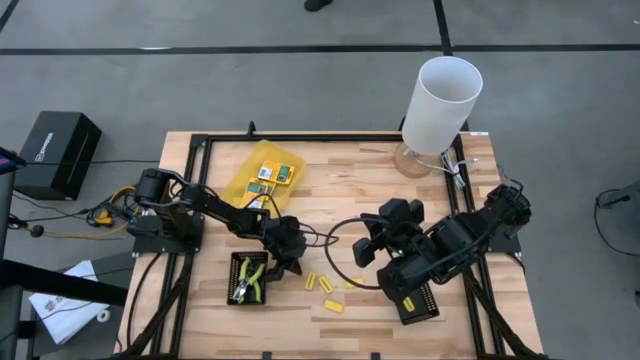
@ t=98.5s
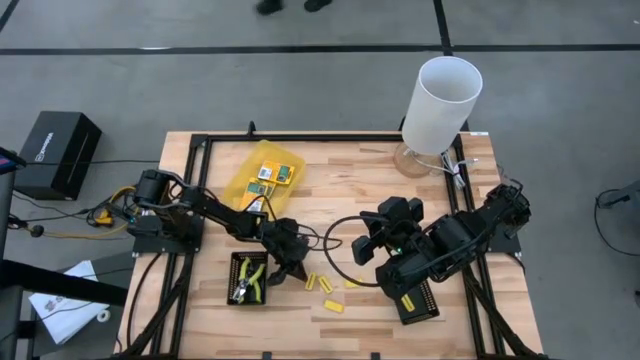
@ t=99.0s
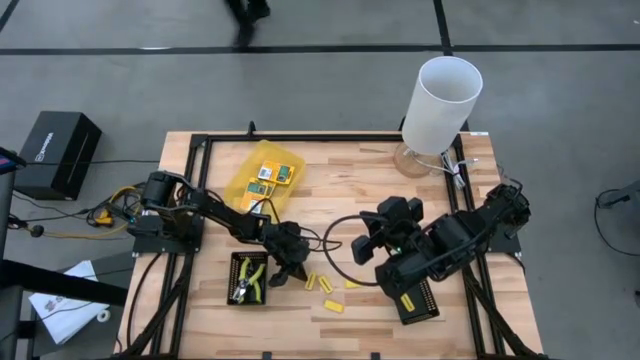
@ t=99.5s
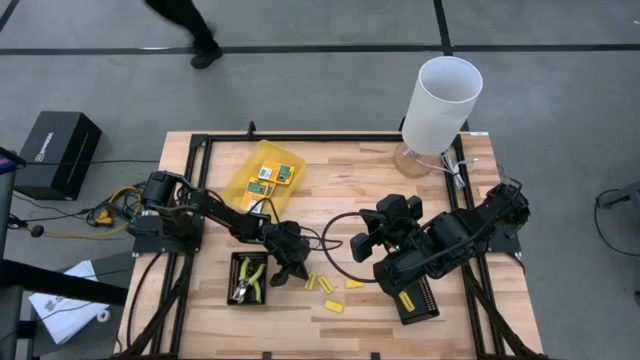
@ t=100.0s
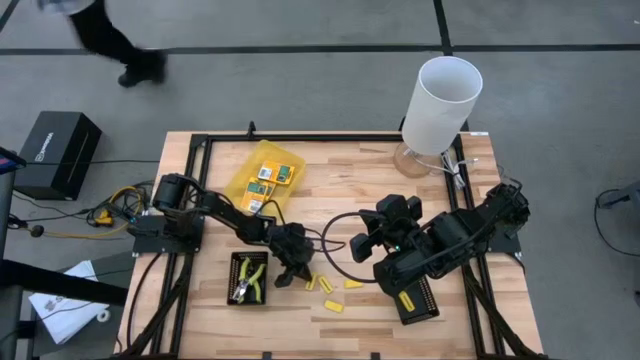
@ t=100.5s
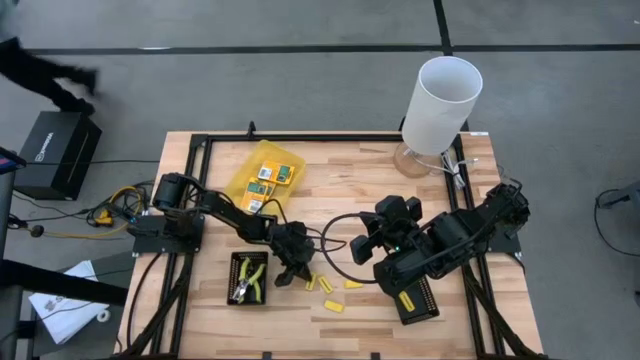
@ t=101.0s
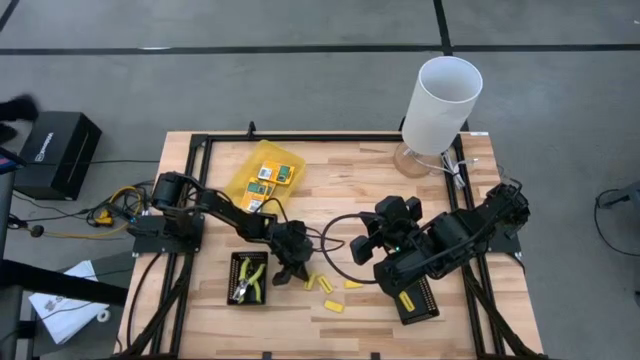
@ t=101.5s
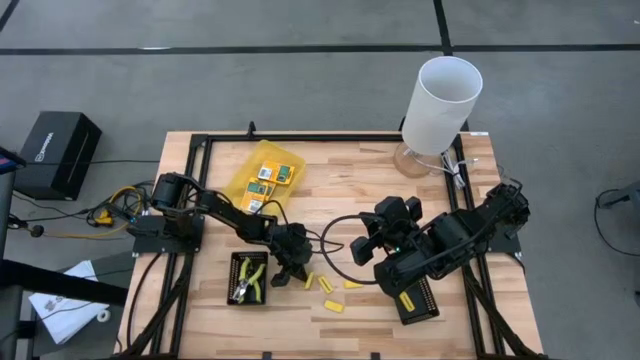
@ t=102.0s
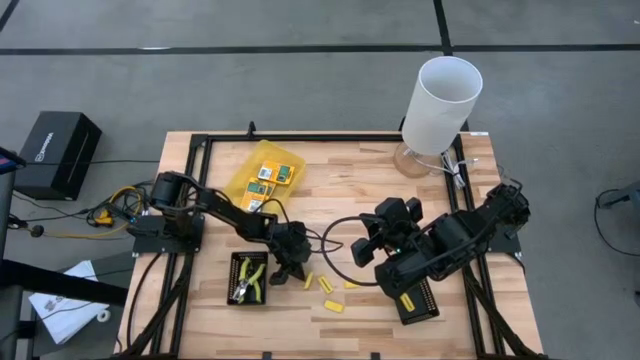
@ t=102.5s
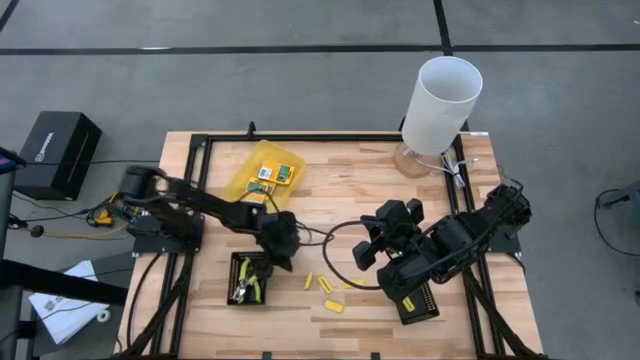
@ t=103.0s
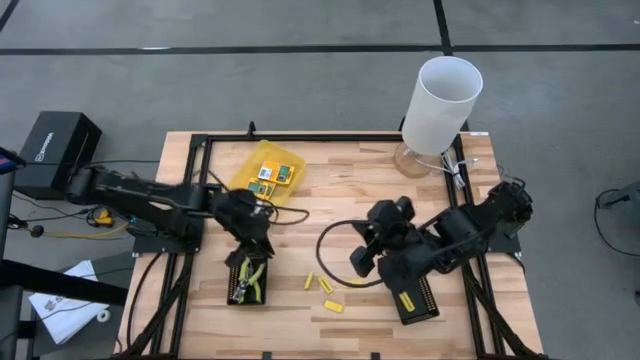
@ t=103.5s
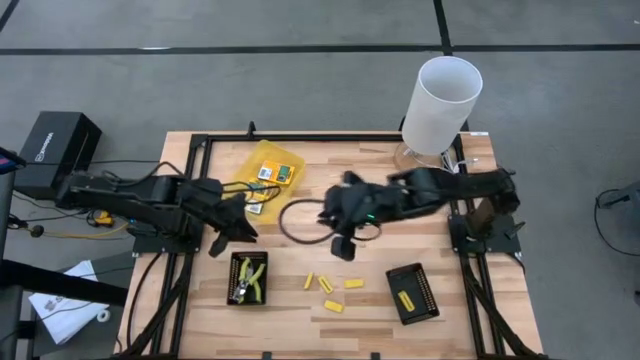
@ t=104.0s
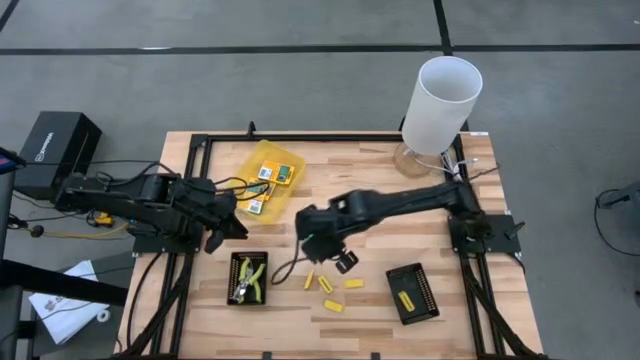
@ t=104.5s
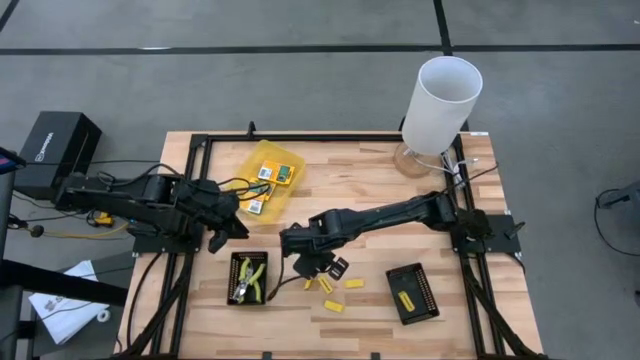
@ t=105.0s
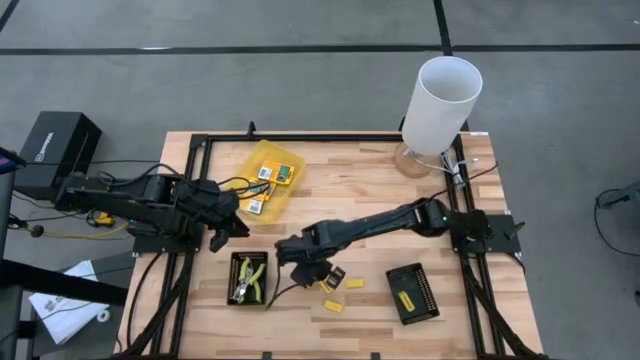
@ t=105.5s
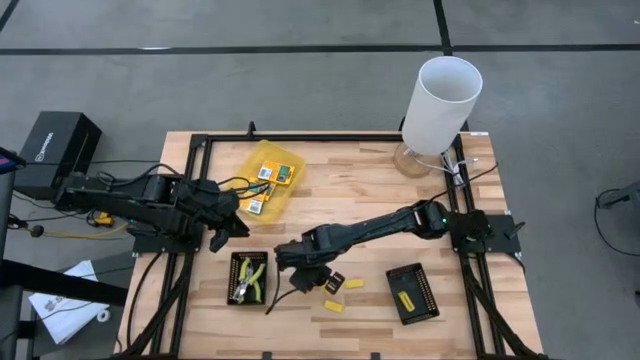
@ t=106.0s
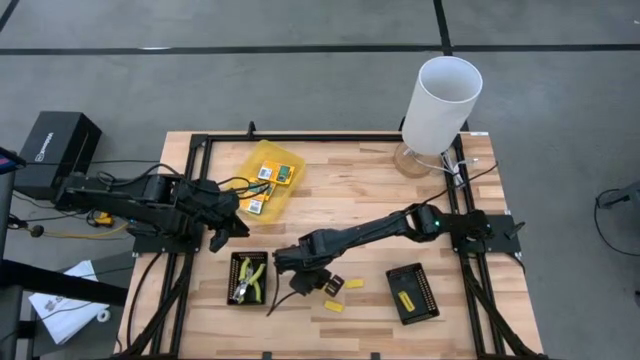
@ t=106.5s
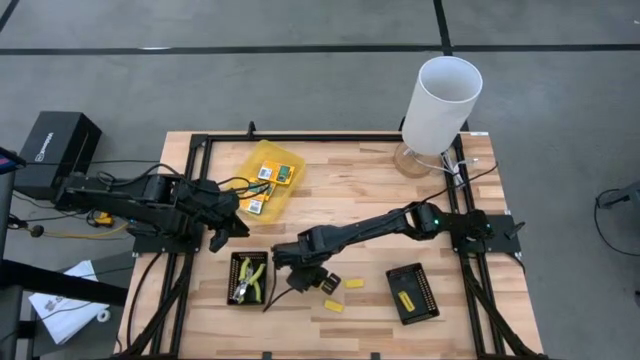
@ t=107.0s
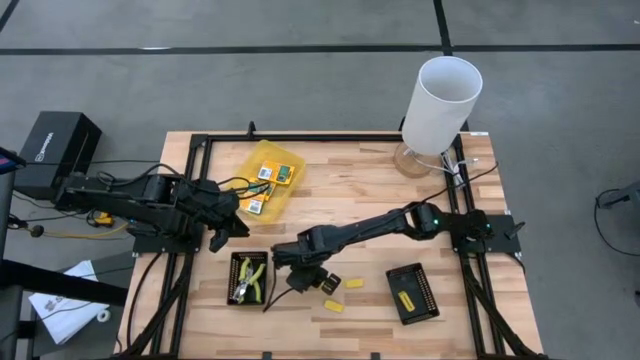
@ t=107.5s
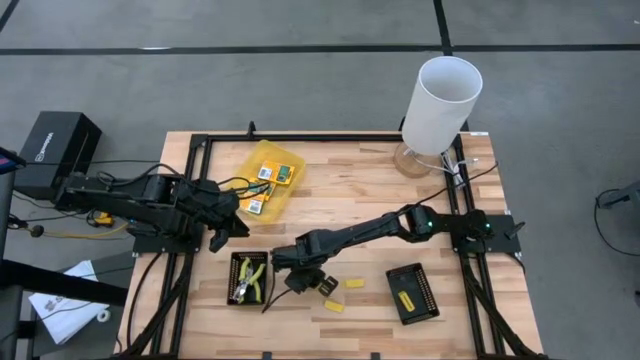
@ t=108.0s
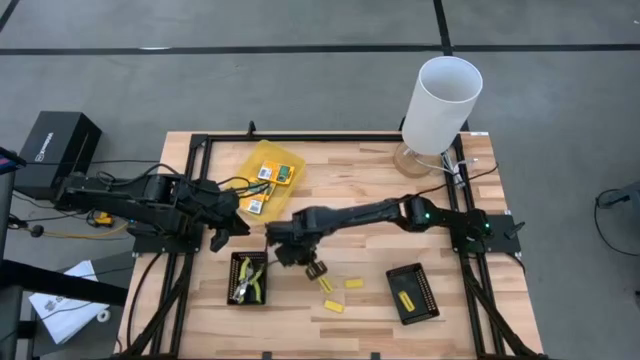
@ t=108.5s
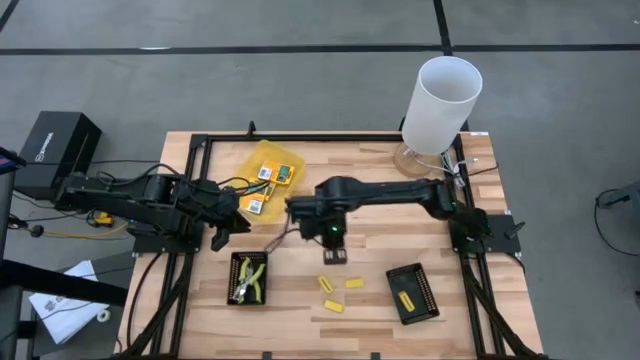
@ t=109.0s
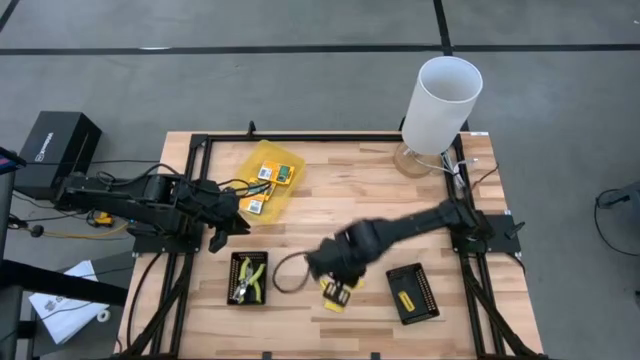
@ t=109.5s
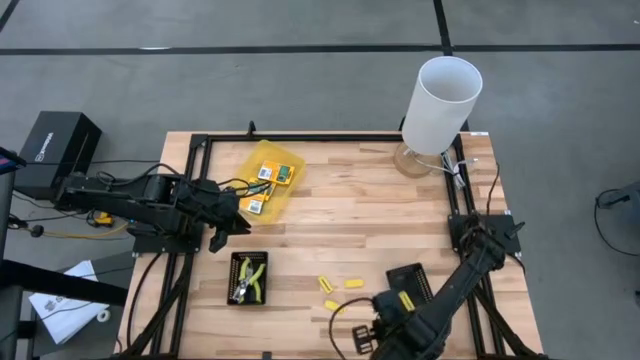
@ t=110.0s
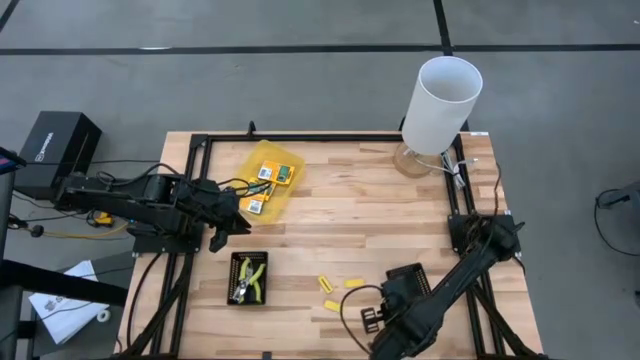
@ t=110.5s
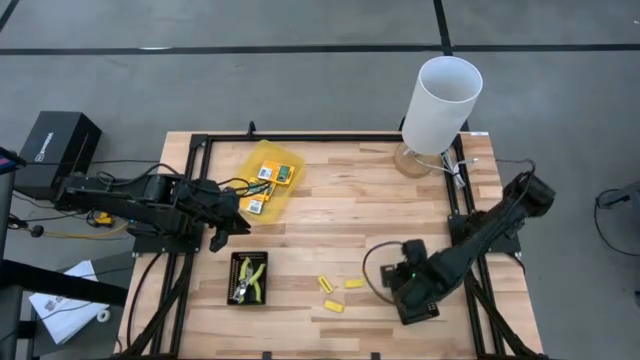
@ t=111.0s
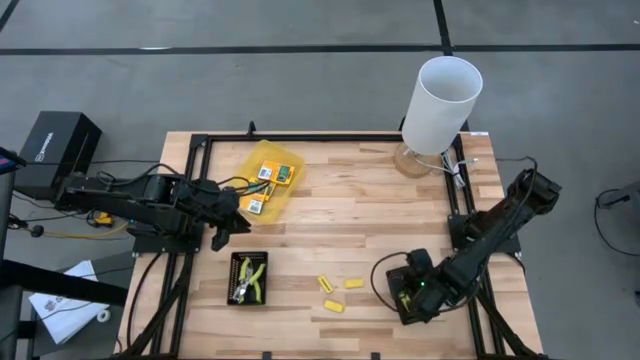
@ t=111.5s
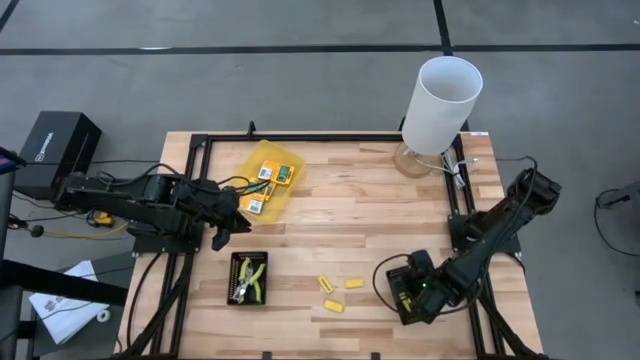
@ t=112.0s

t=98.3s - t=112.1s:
Task: Pick & Place School Supplies
Put the yellow eraser into the right black bin

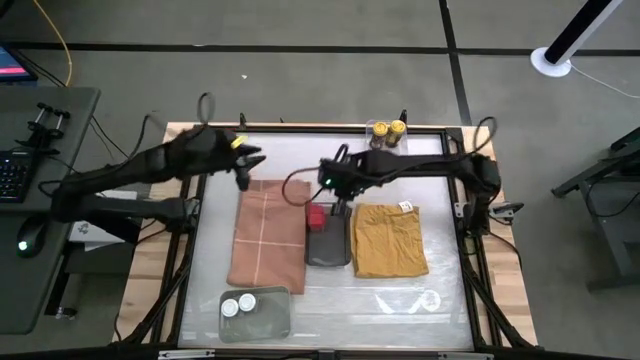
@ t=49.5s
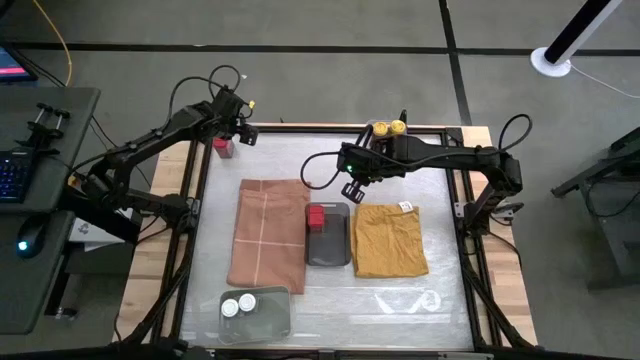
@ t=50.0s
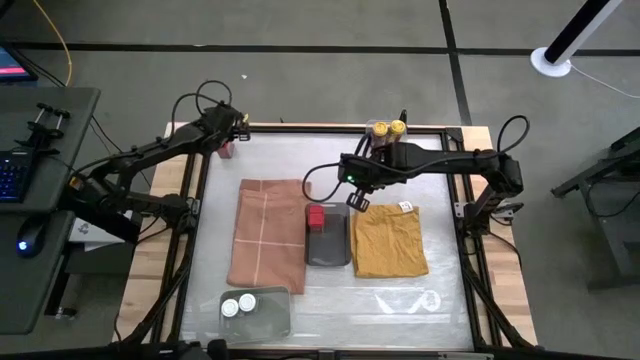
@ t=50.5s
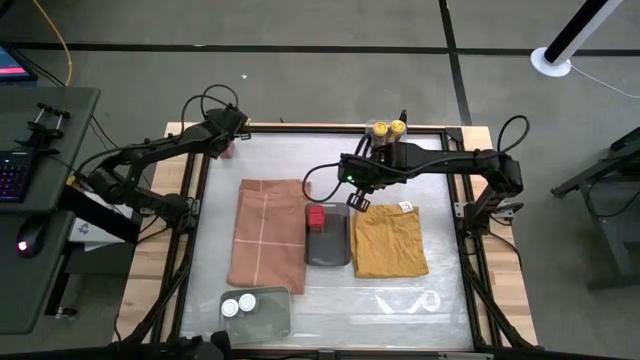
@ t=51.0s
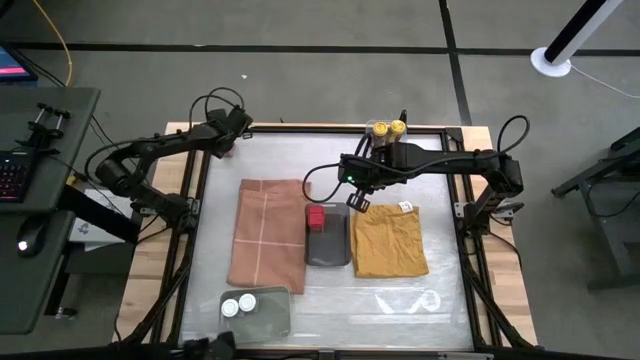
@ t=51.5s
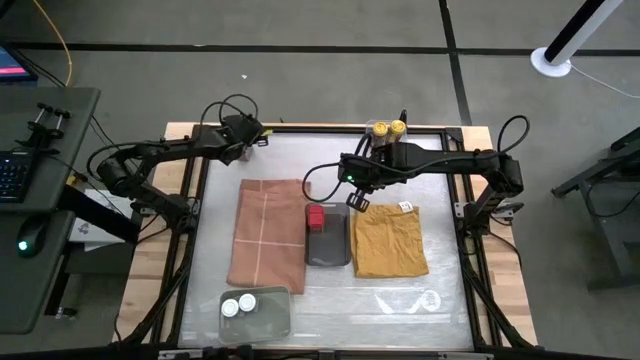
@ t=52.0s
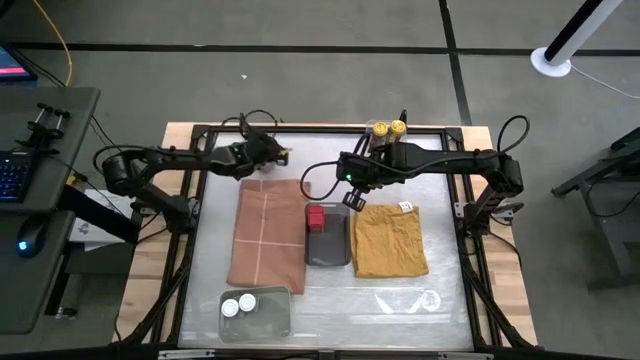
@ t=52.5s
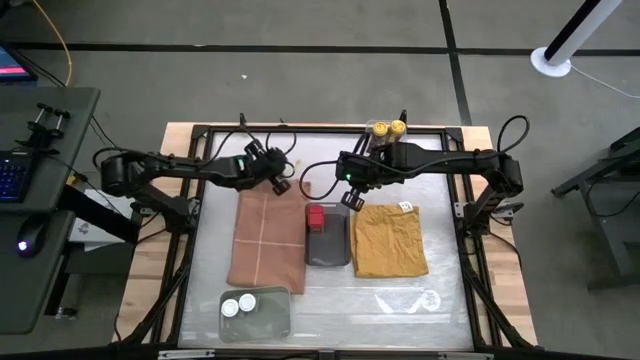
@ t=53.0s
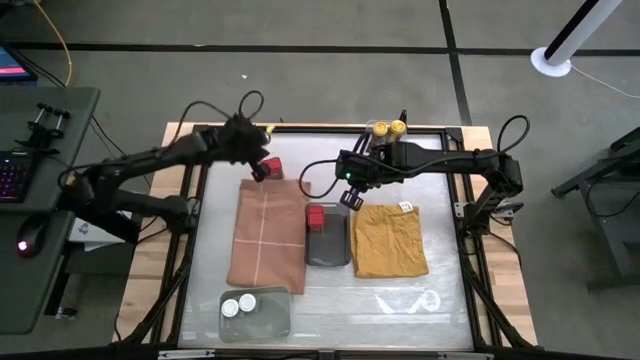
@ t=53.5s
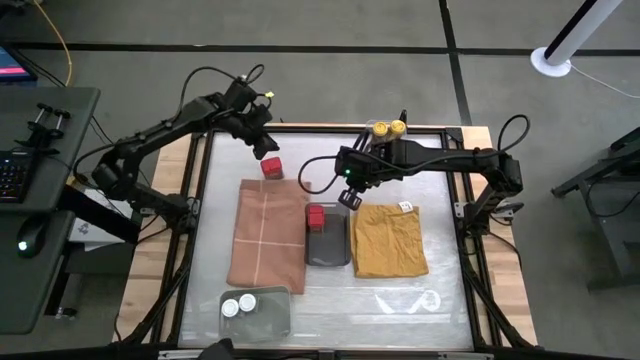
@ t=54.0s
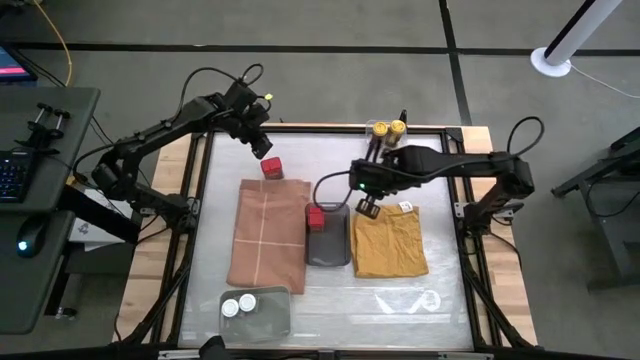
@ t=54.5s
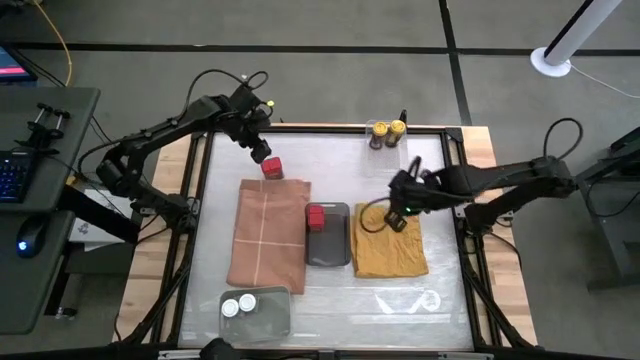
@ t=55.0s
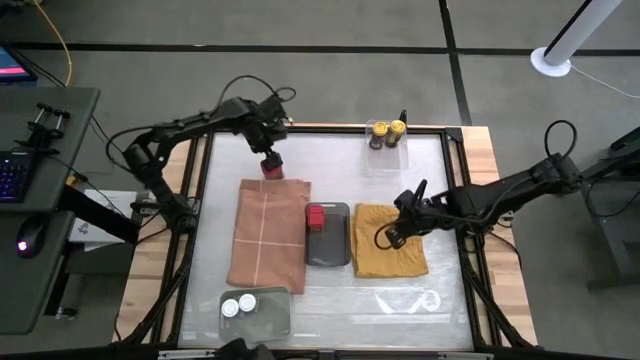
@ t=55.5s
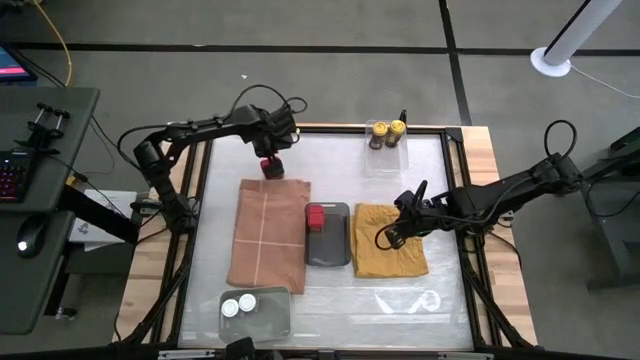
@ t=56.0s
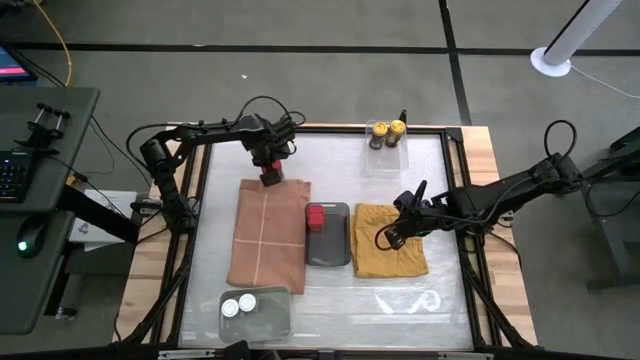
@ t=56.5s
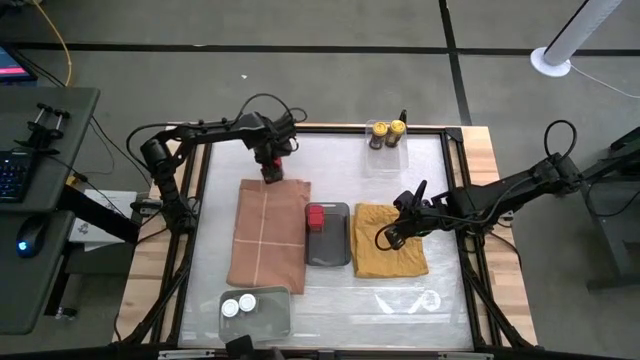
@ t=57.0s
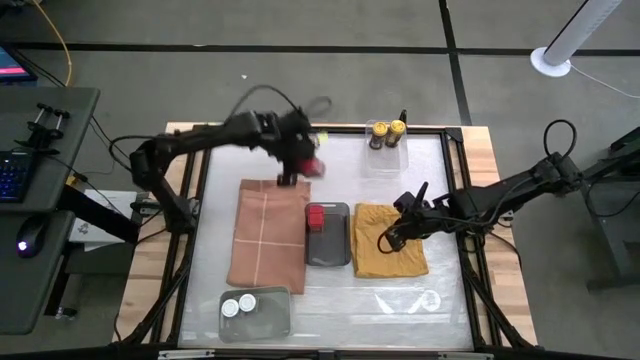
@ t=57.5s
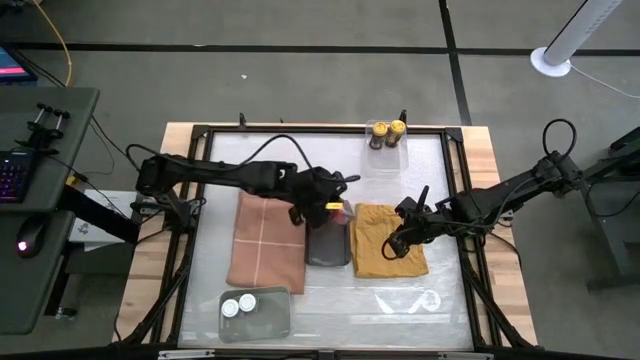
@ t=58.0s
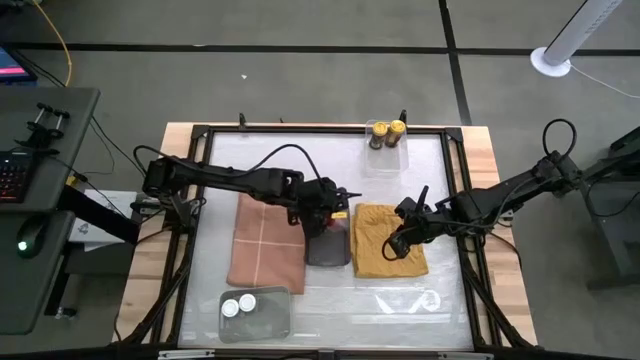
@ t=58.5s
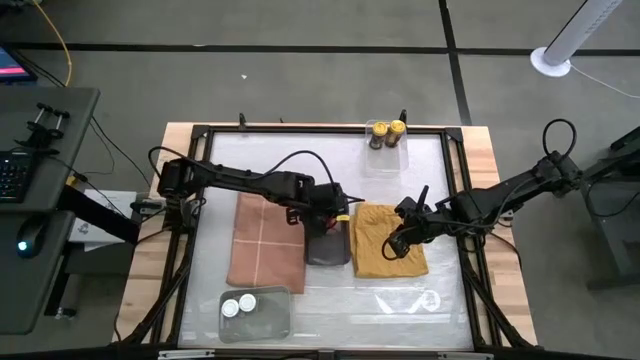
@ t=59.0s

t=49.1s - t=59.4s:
Task: Sort spices by type
Put the red seasoning can into the black bin
